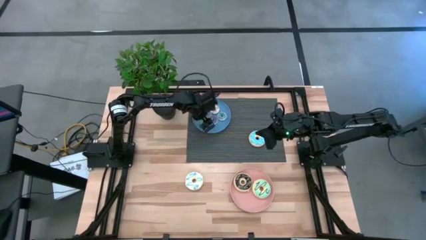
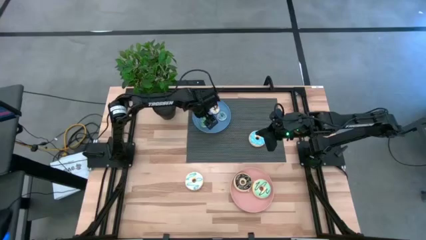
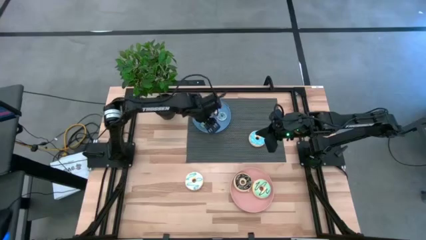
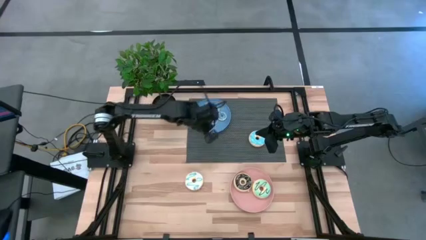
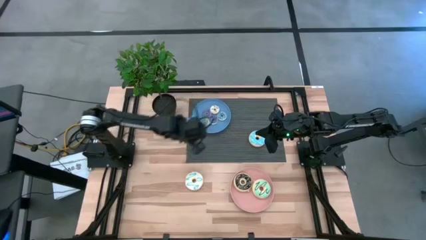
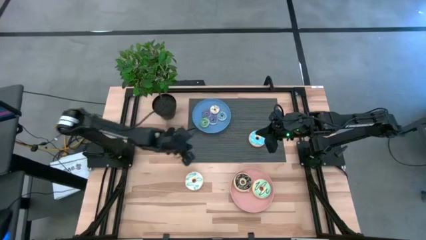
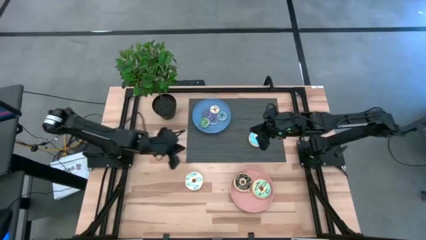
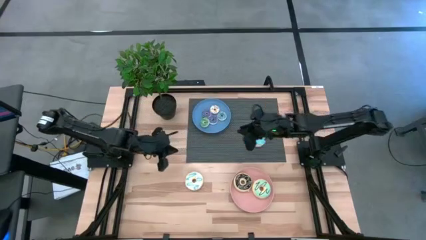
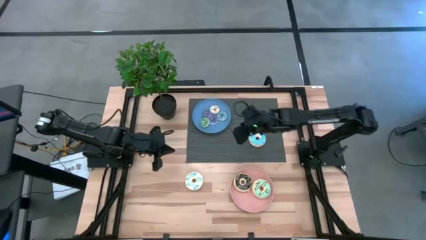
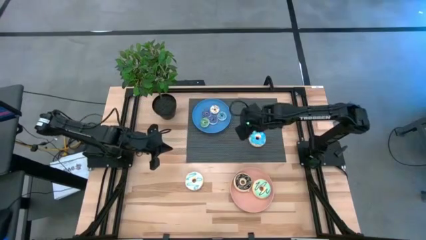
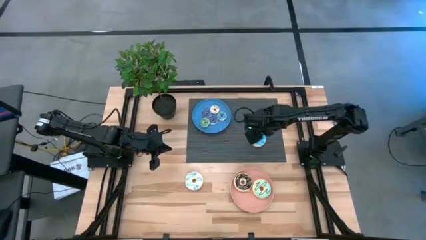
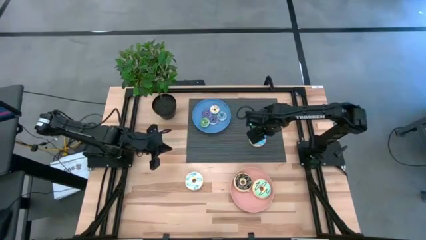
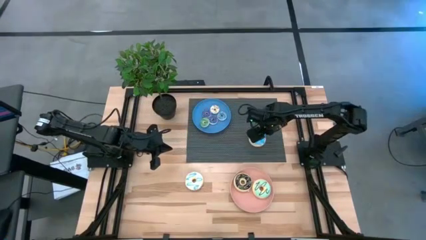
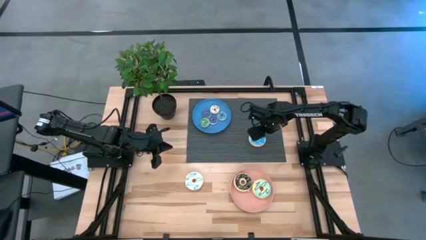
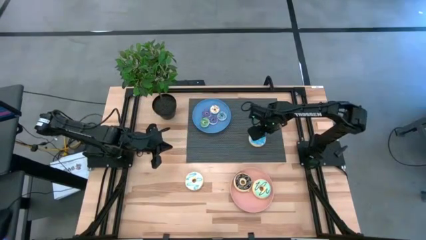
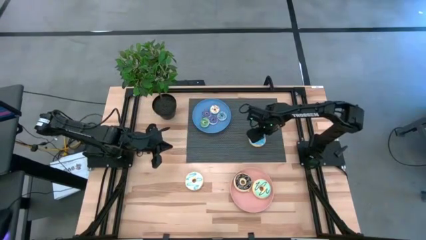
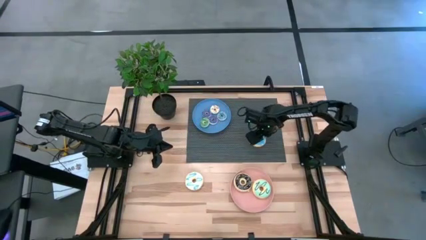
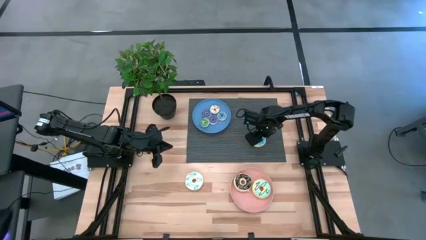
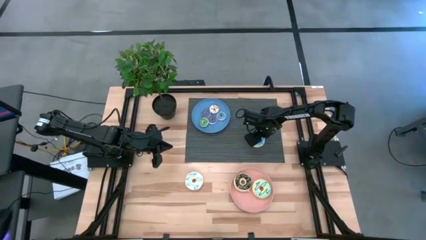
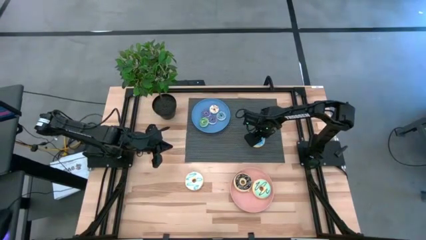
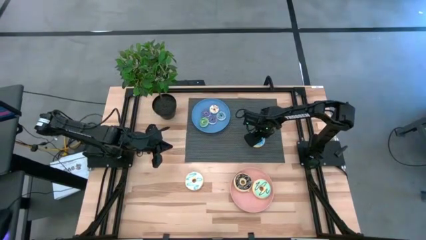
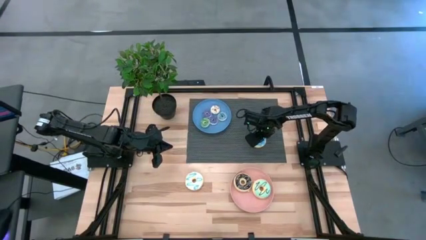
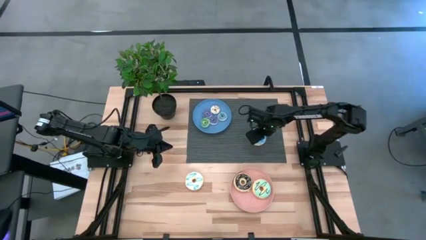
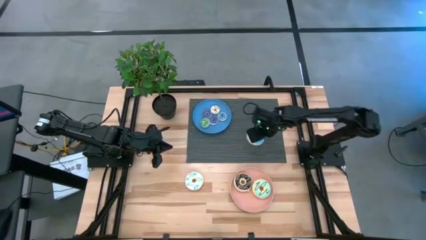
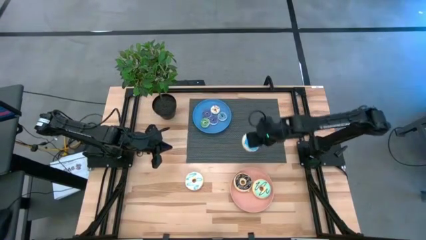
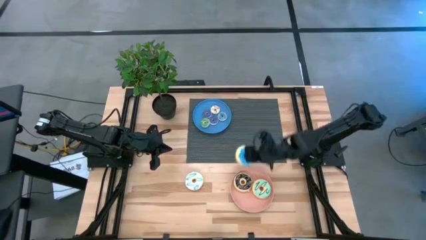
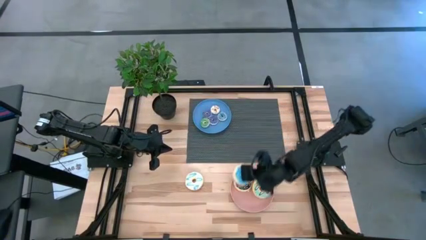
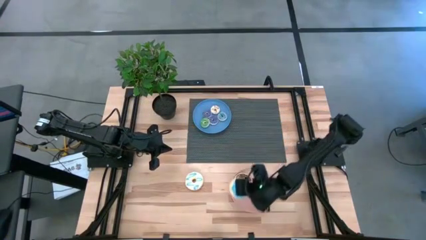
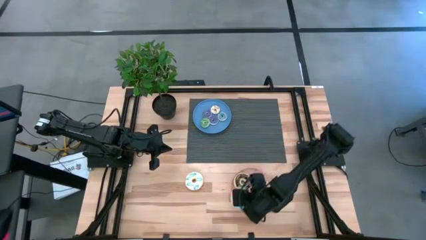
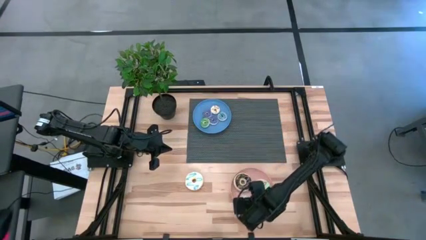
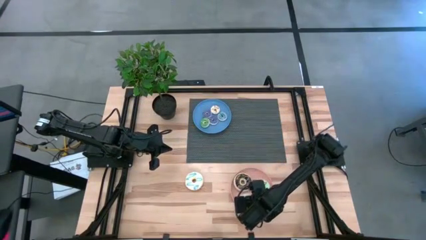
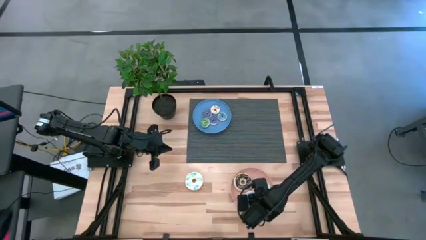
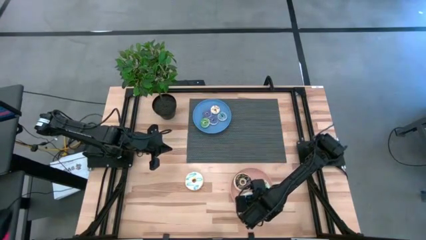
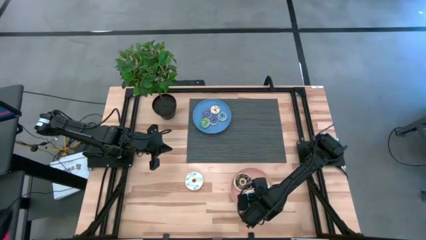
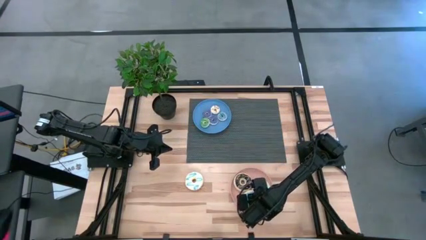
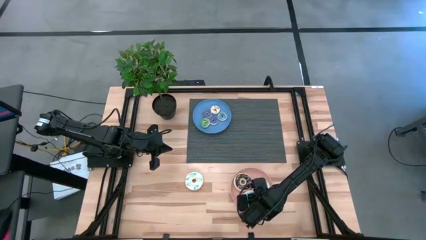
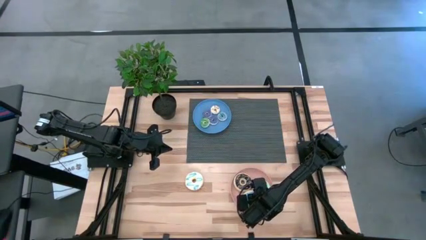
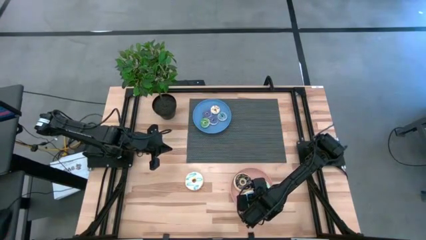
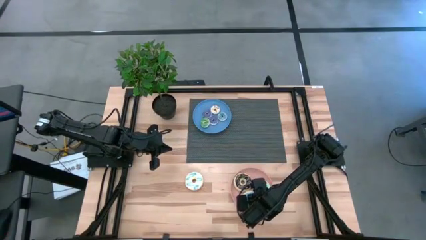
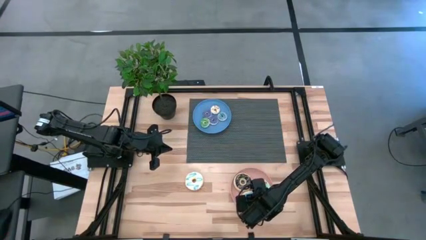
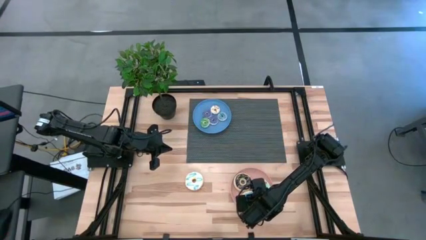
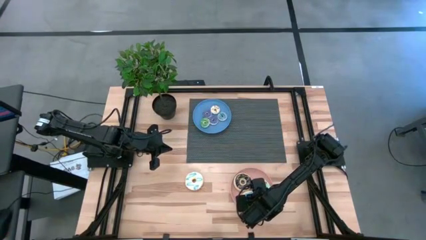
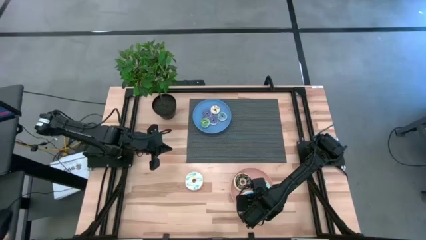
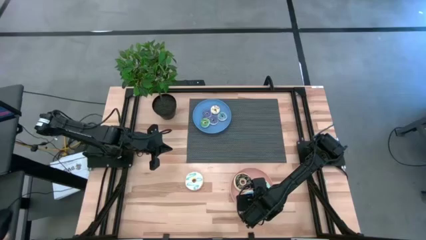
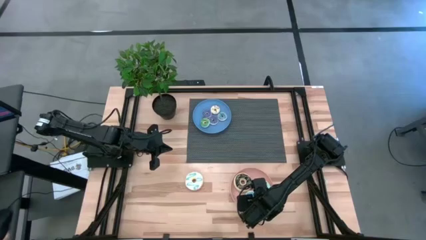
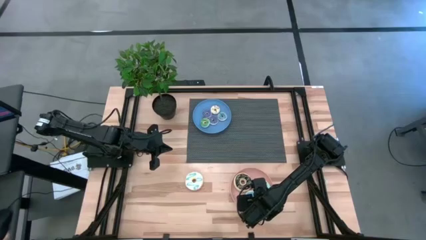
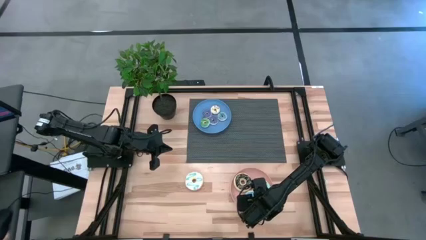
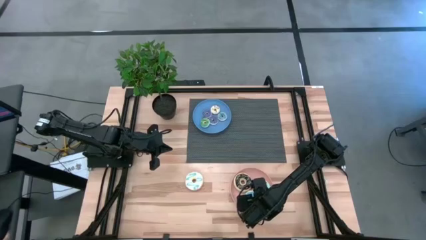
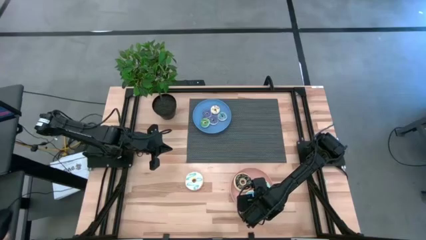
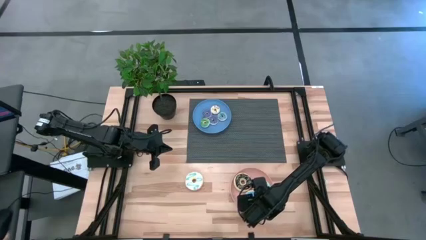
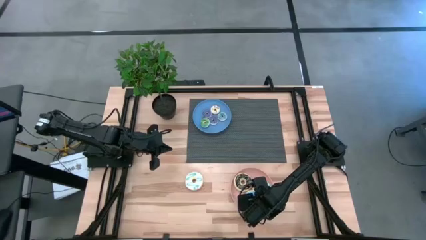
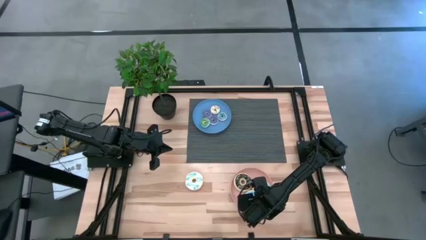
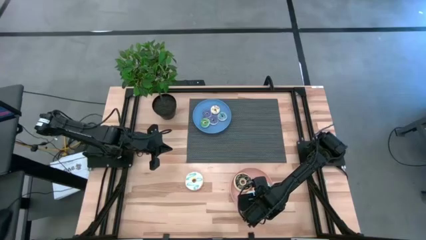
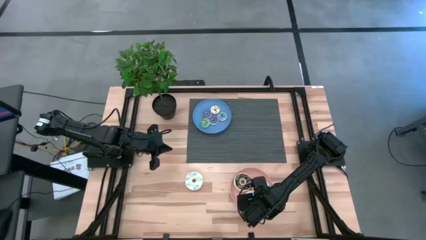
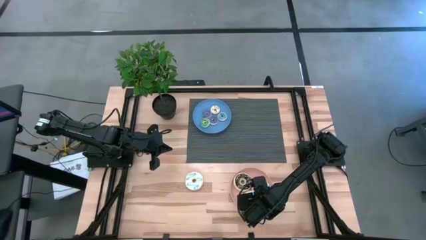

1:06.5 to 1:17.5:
Task: Pick & Place donuts
Put the big light blue donut into the pink plate

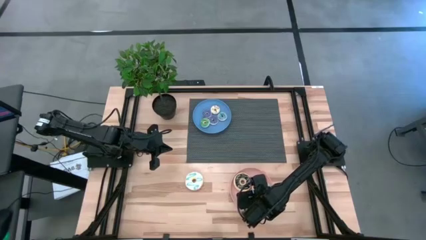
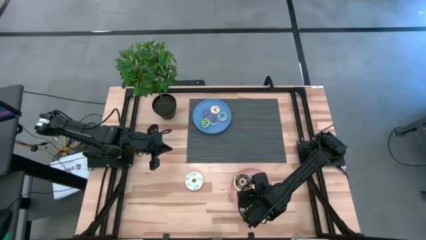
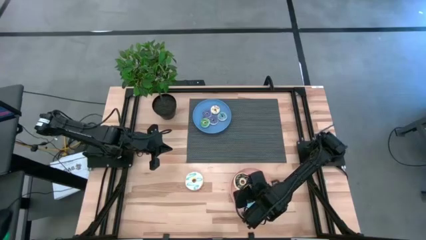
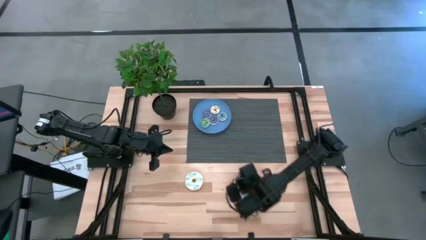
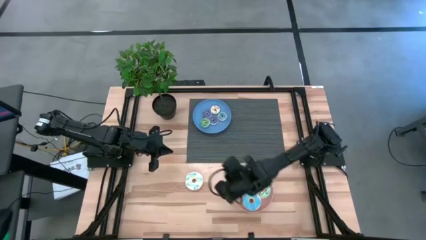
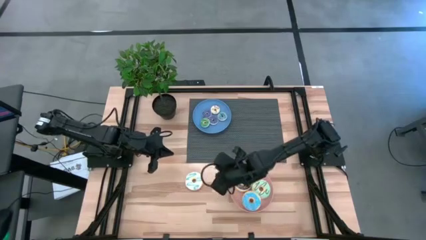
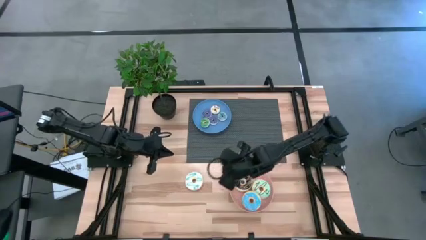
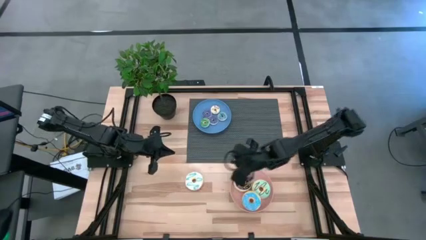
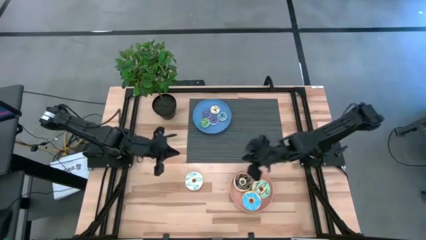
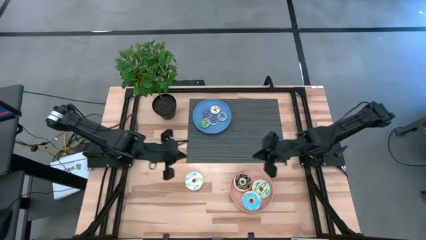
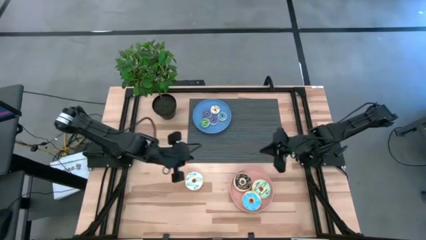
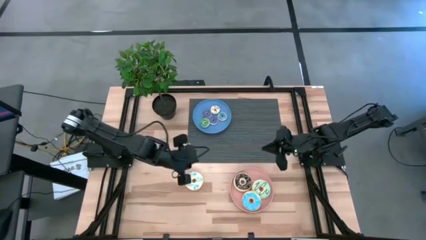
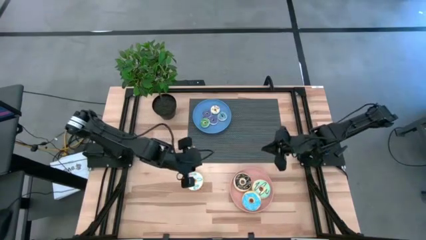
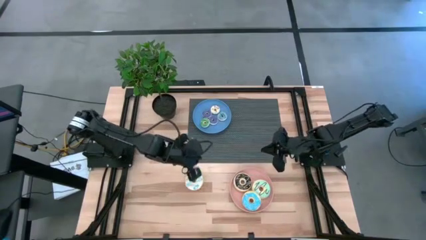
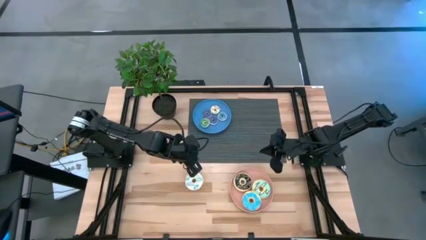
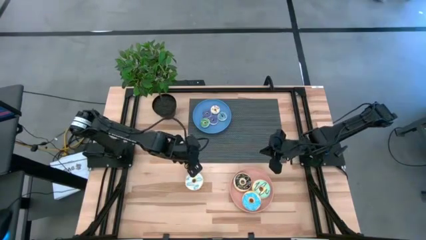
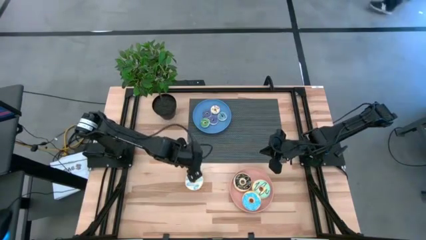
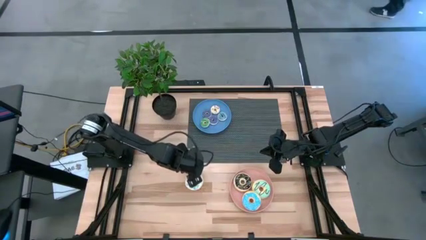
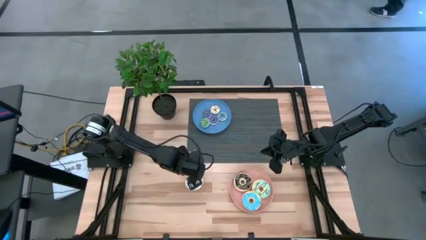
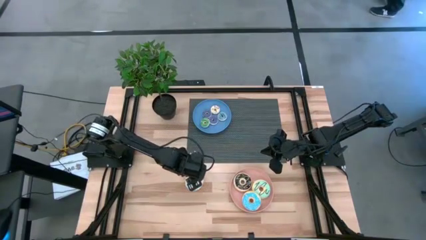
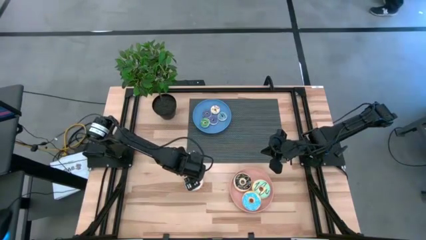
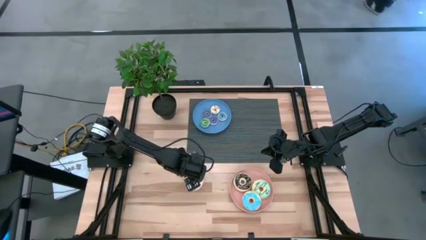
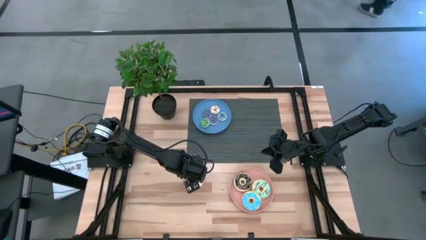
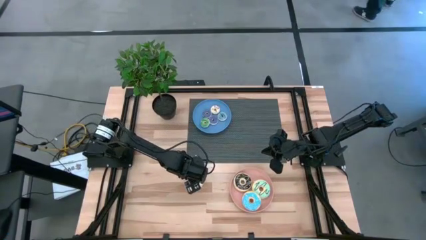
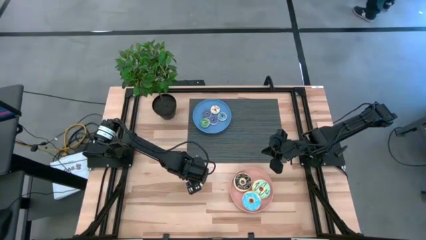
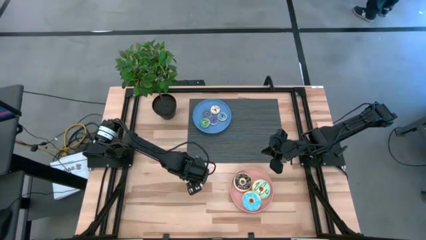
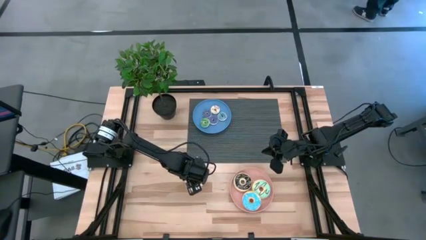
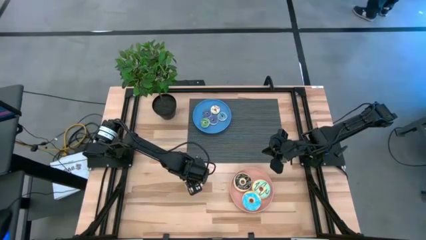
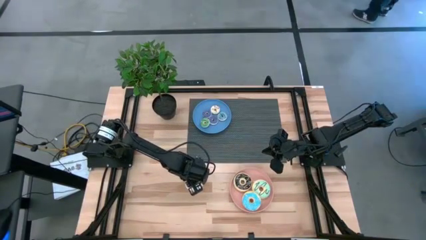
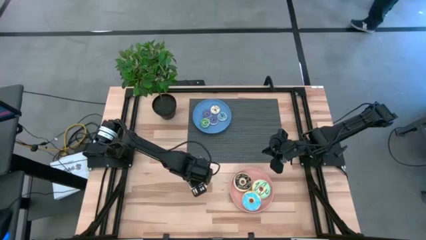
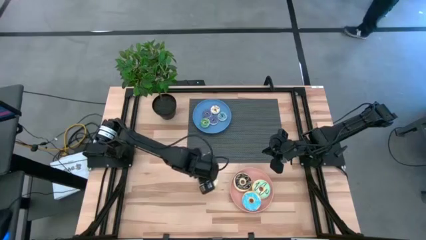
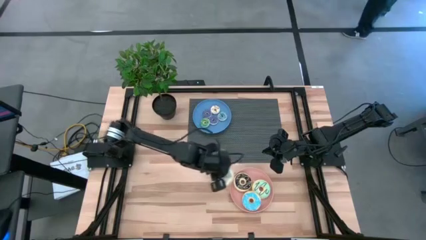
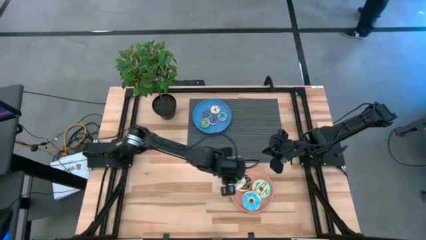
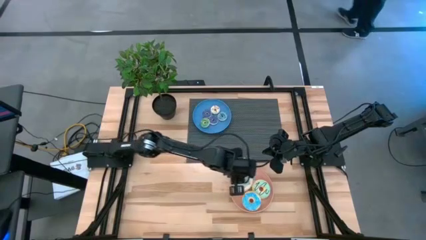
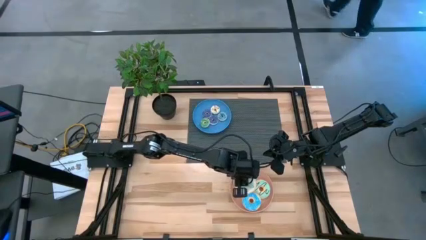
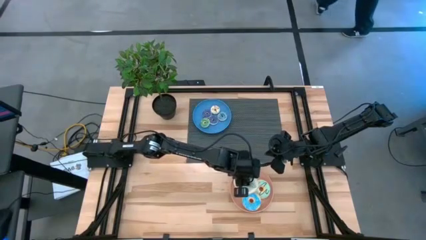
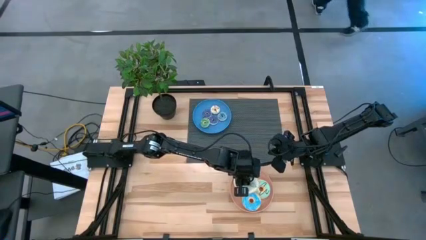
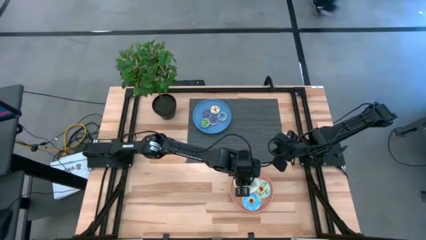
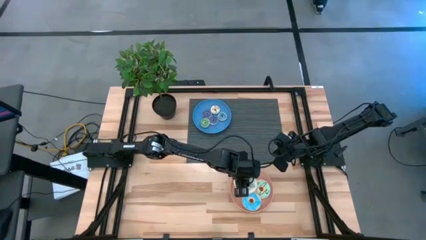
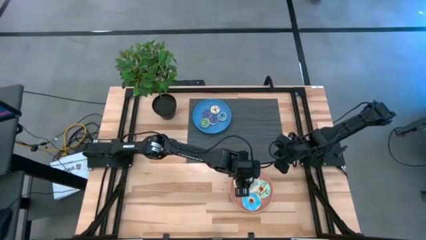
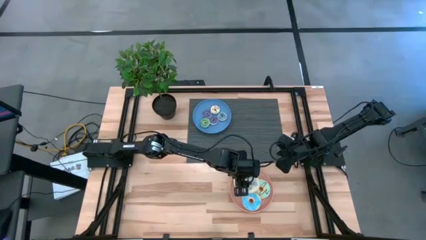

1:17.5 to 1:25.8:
Put the big white donut into the pink plate
